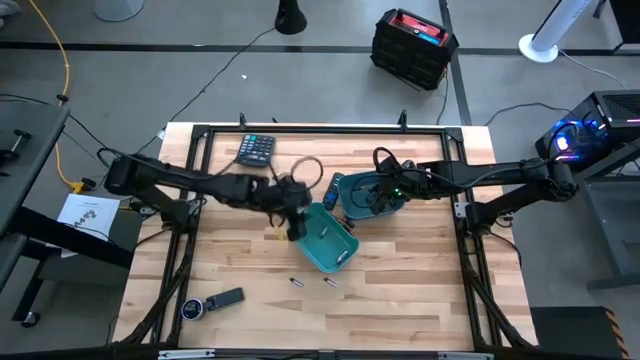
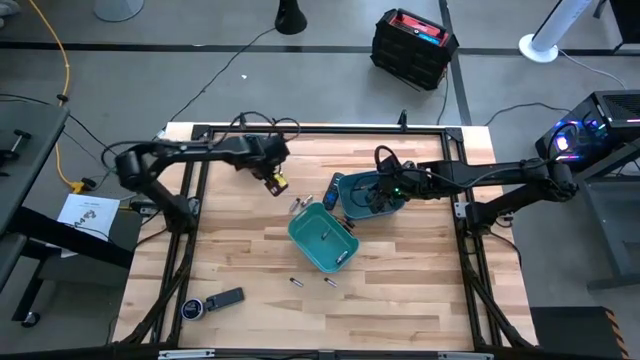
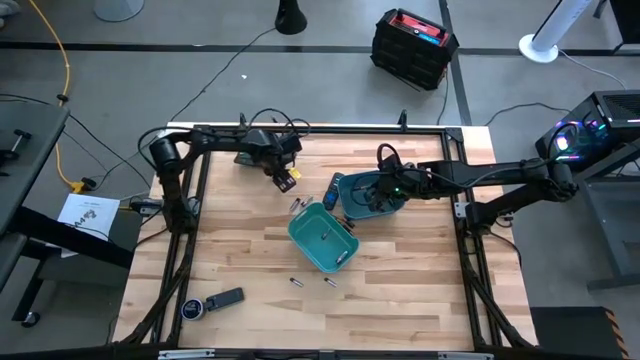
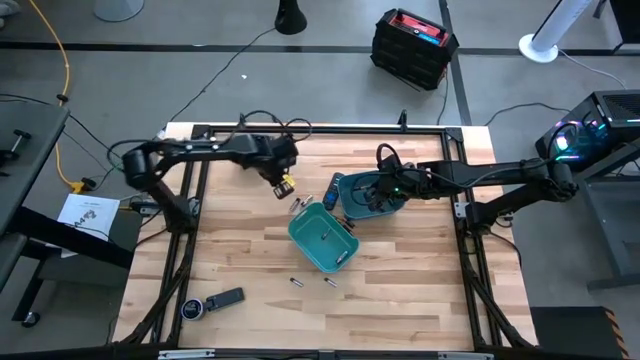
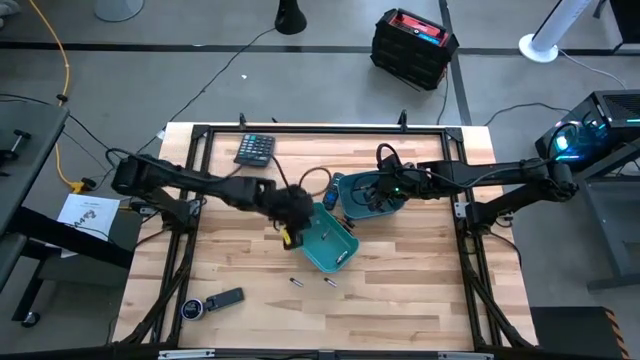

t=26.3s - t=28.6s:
Task: Sort batteries
Put the white battery into the green bin

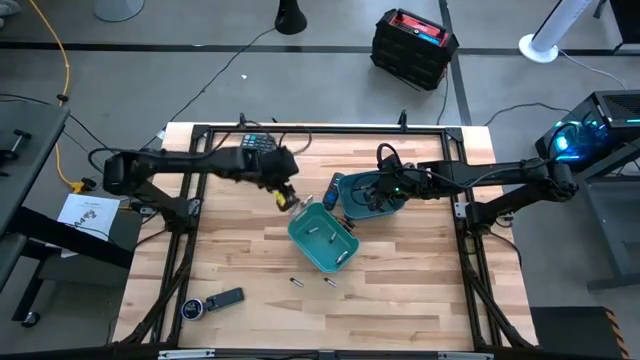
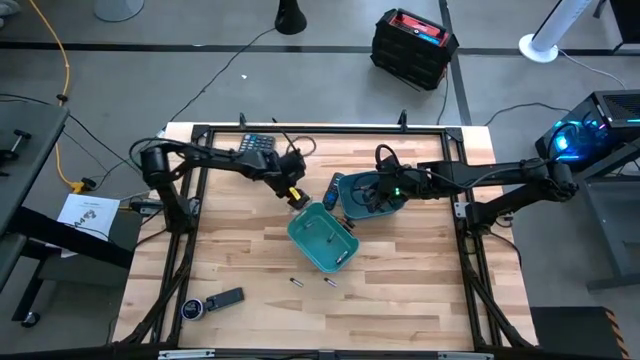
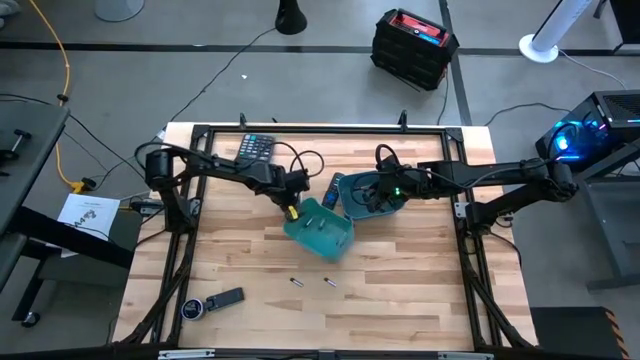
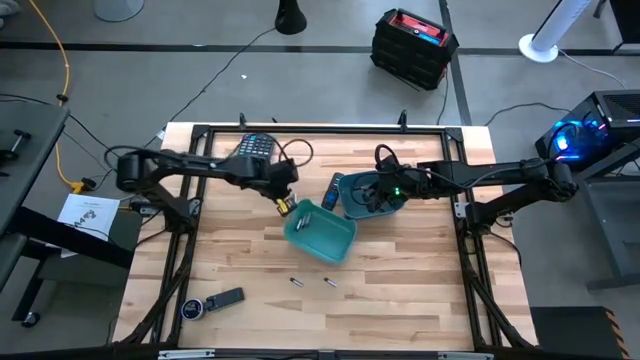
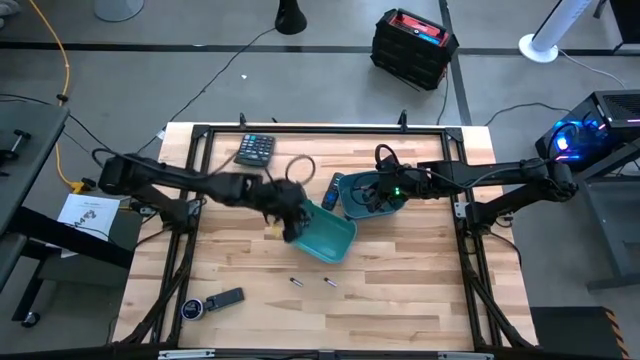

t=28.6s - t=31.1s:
Put the white battery into the green bin

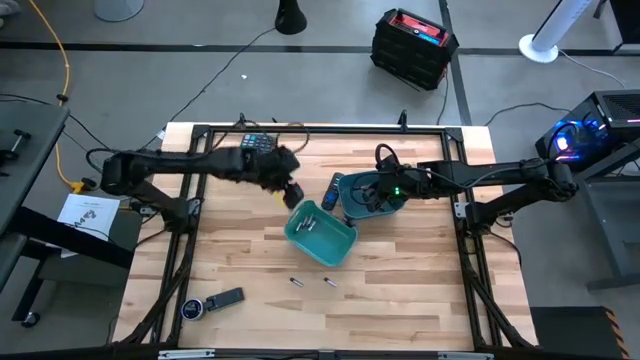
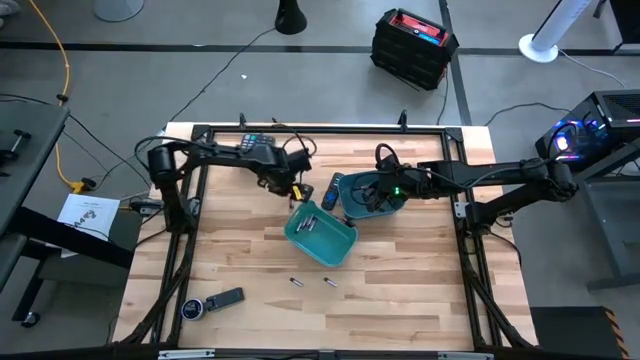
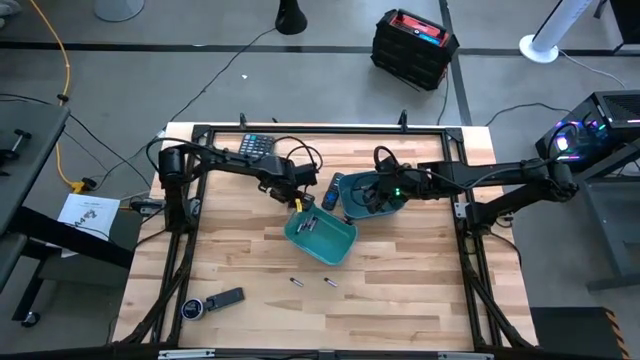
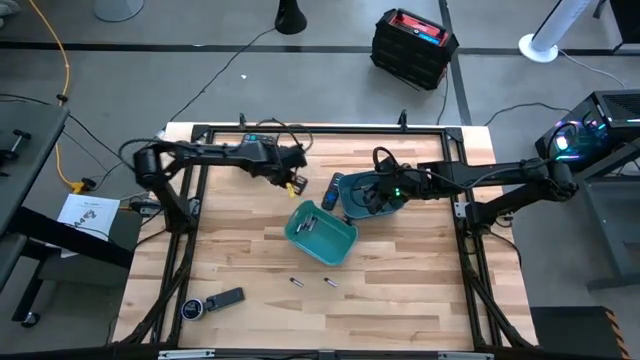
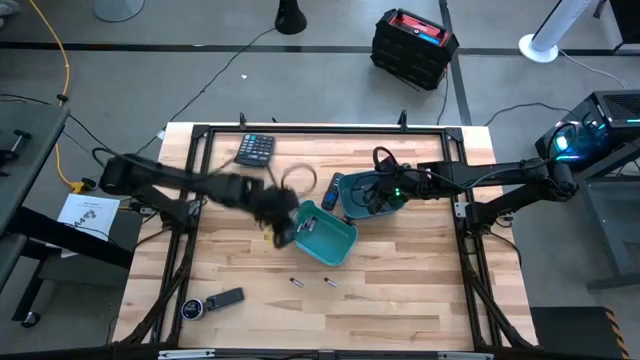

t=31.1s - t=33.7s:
Put the white battery into the green bin

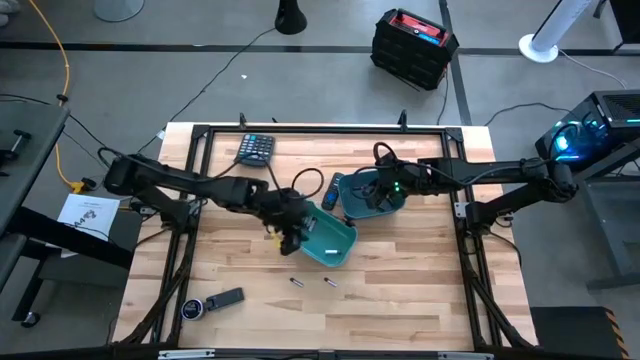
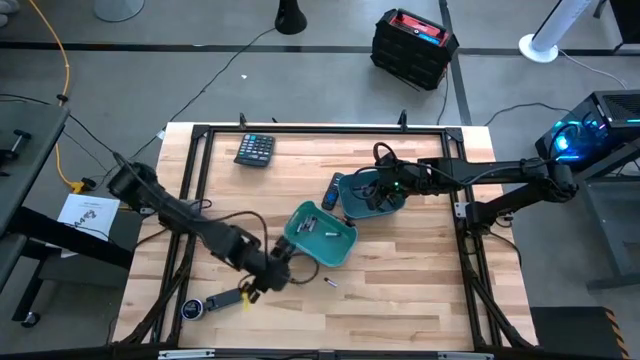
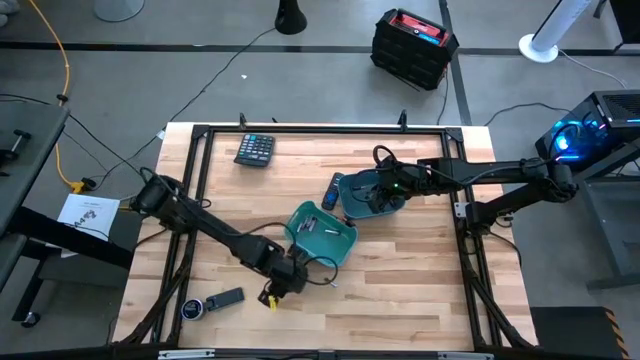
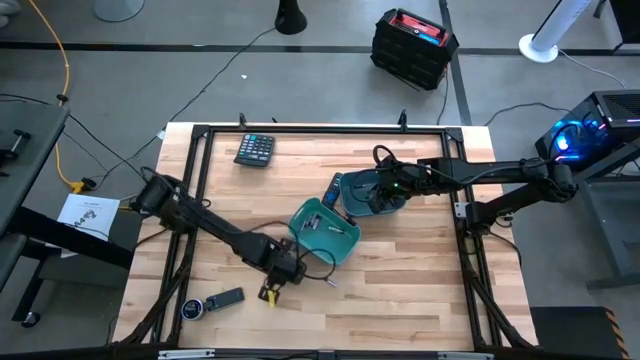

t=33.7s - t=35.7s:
Put the white battery into the green bin

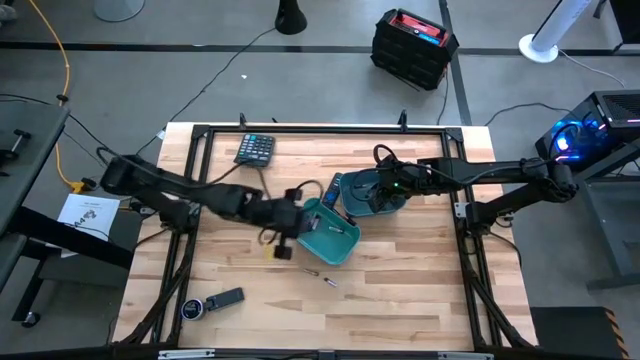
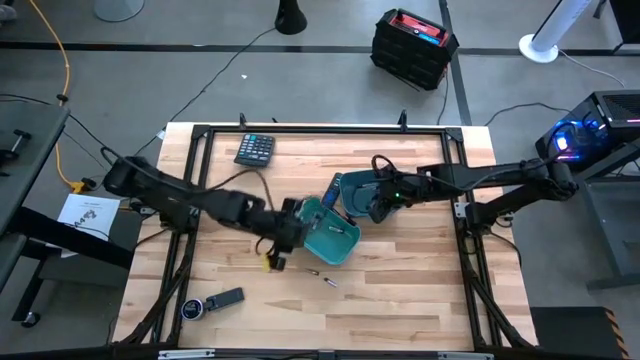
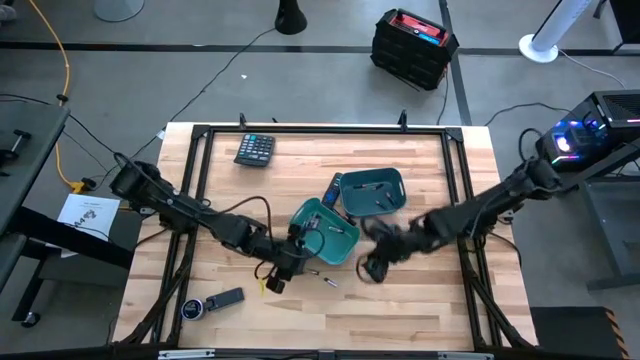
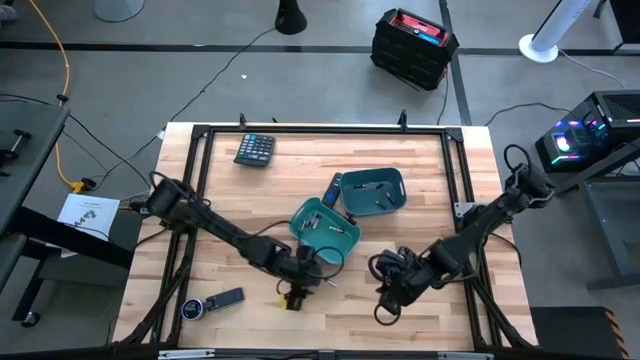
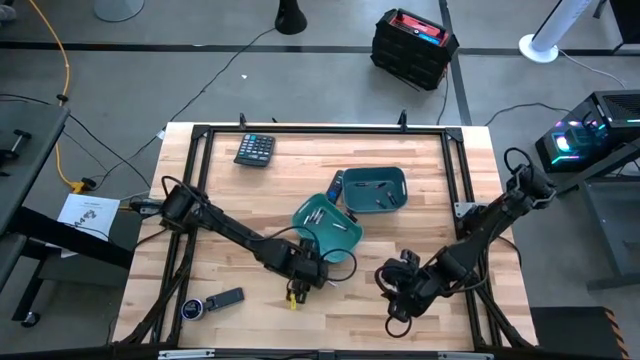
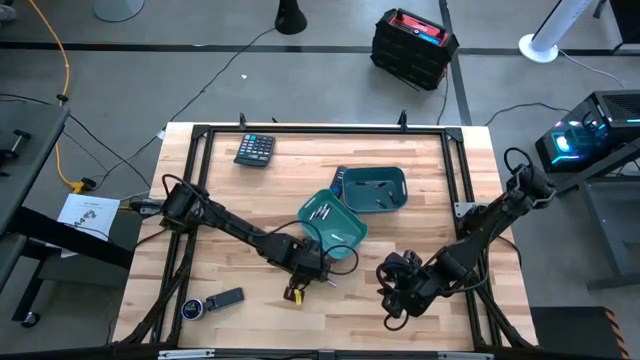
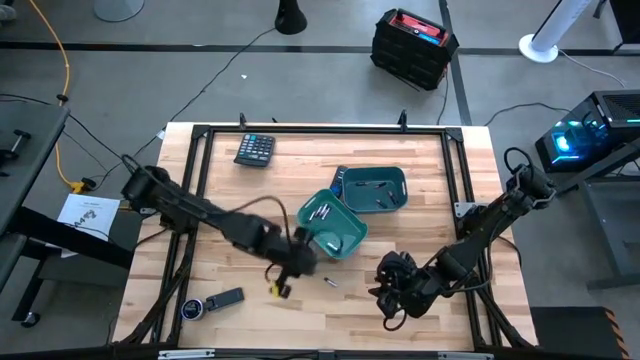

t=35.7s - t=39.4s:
Put the white battery into the green bin

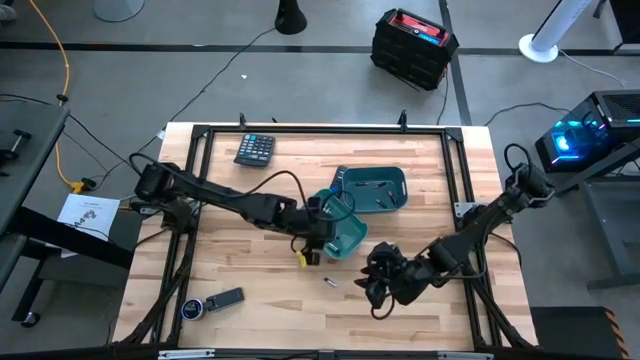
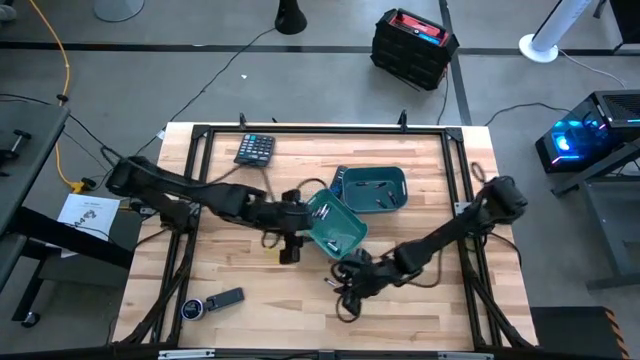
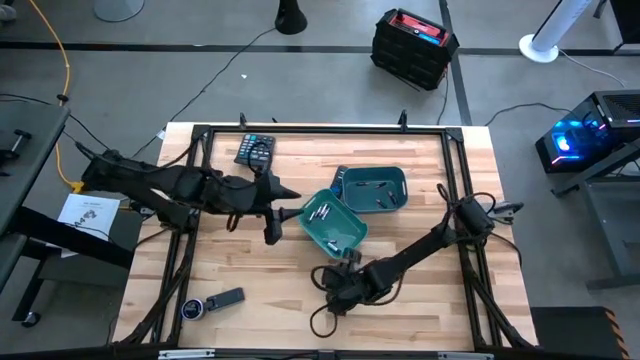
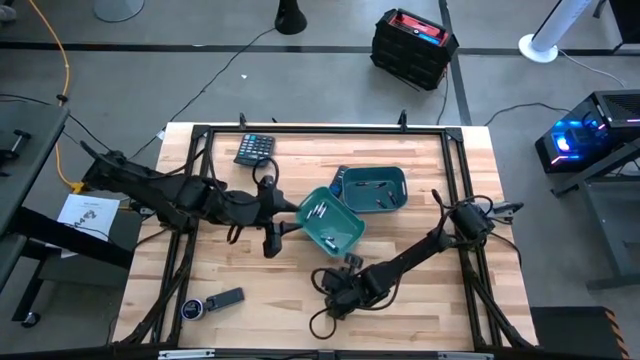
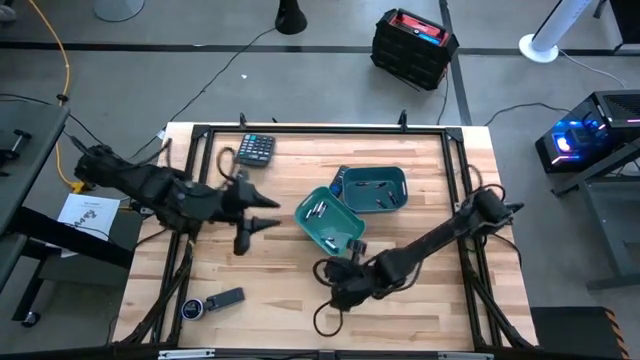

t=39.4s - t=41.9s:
Put the white battery into the green bin

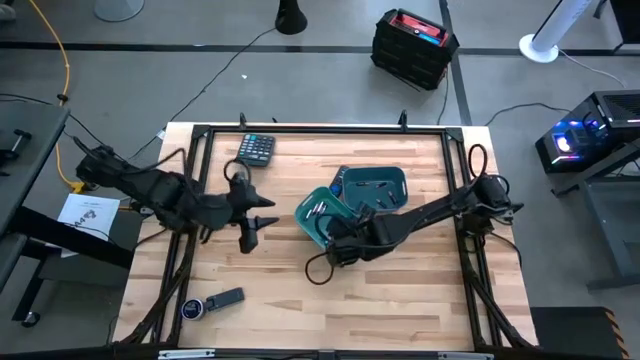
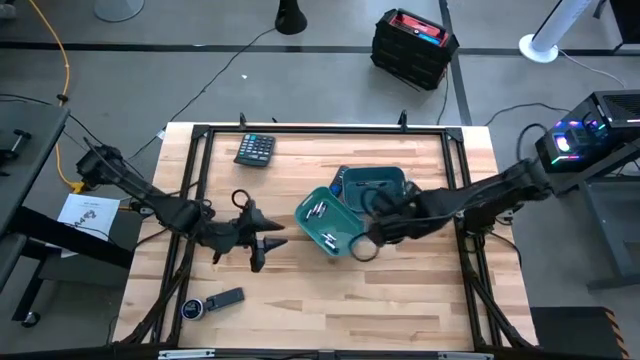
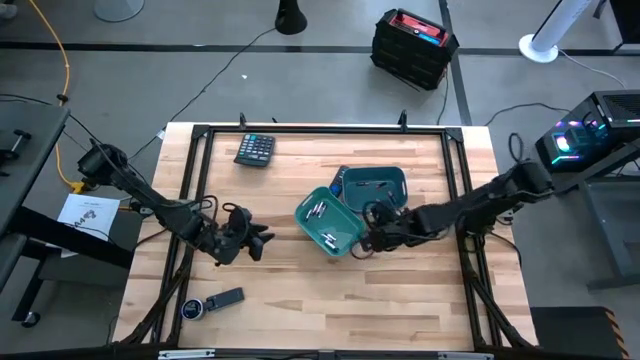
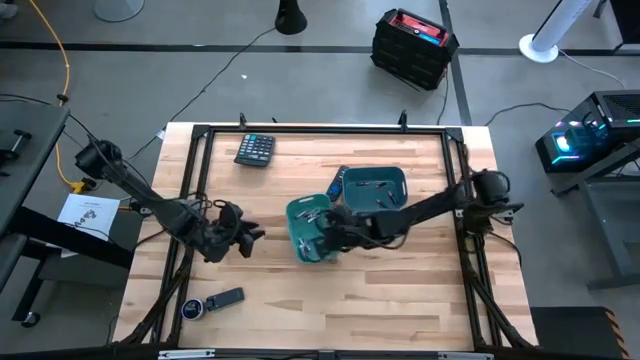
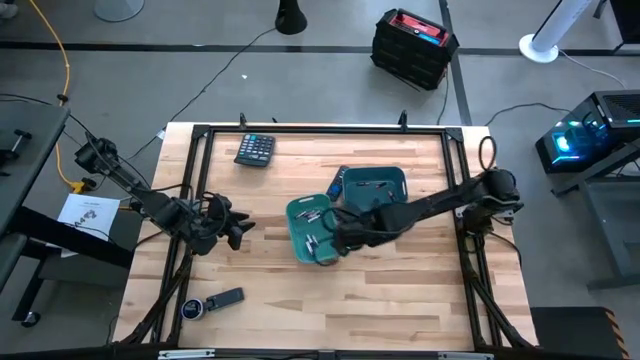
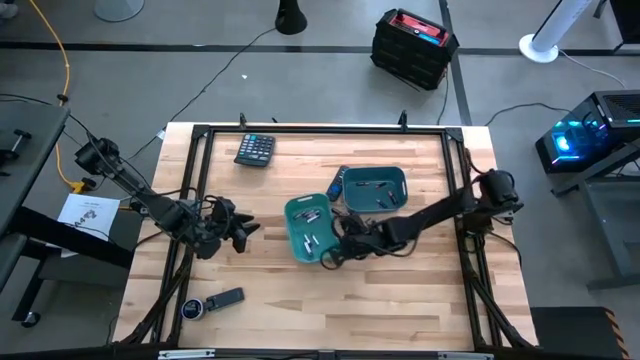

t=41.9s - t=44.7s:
Adjust the green bin

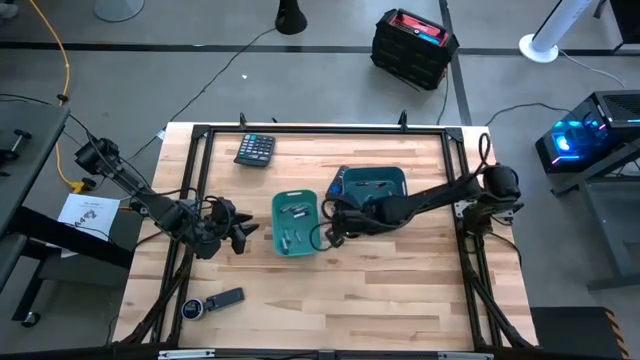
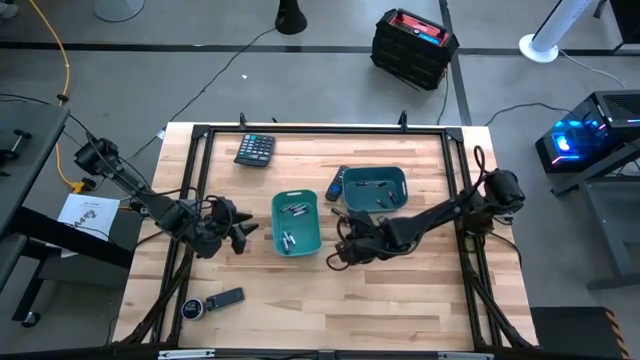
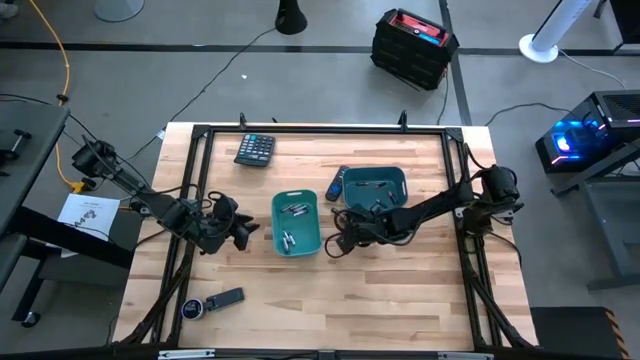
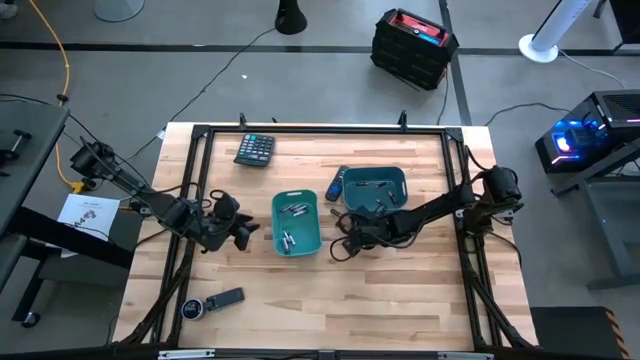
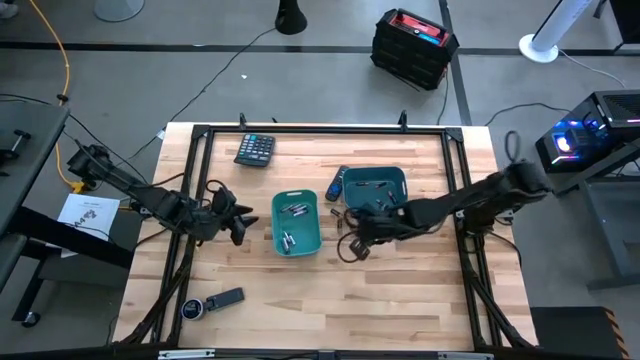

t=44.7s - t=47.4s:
Put the black battery into the blue bin

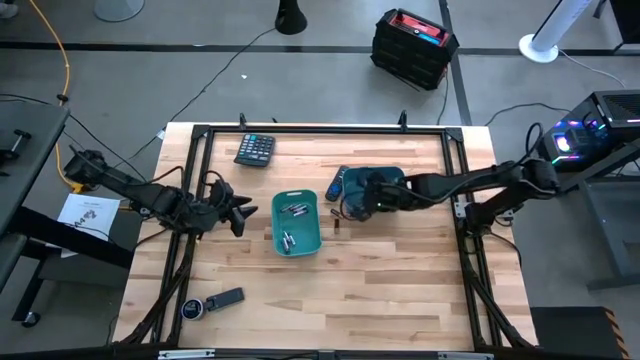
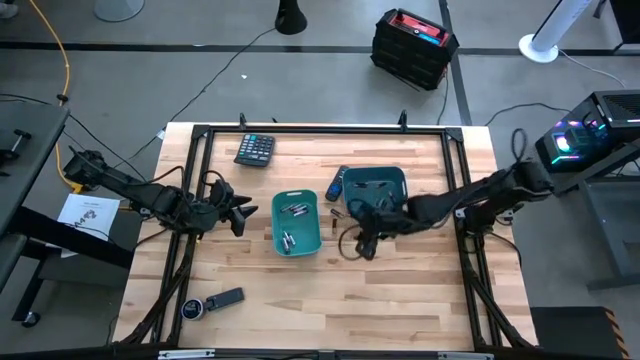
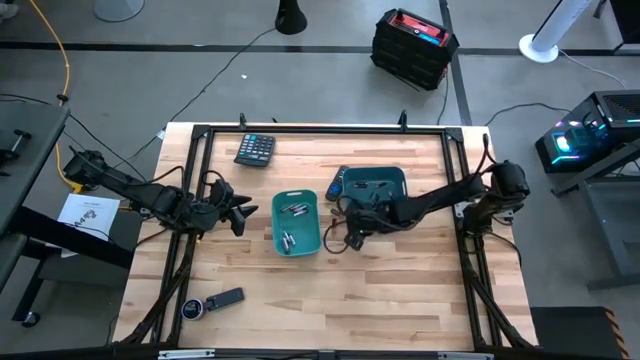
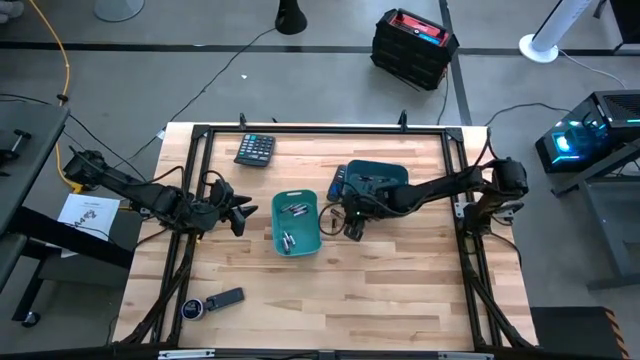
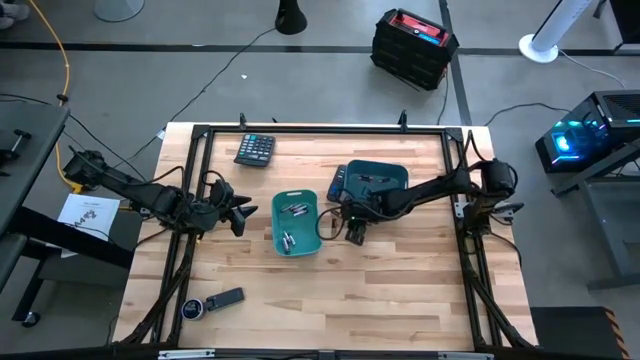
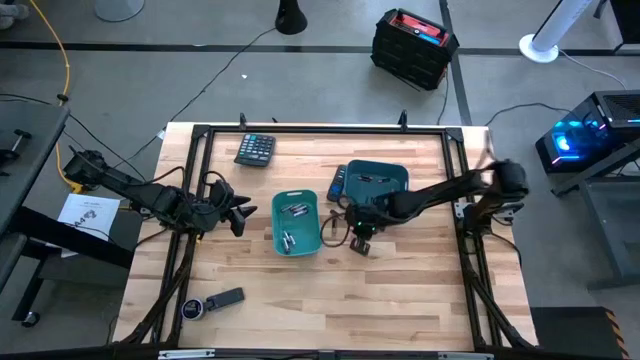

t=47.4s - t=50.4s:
Put the black battery into the blue bin
